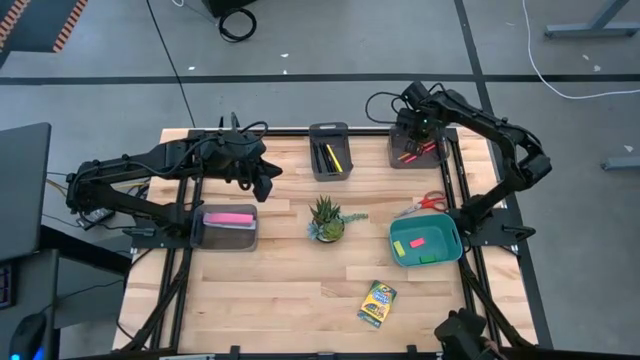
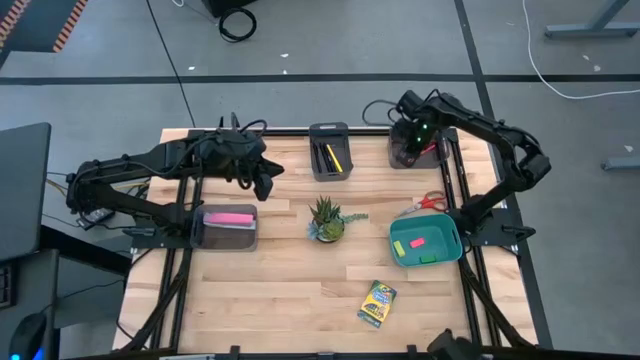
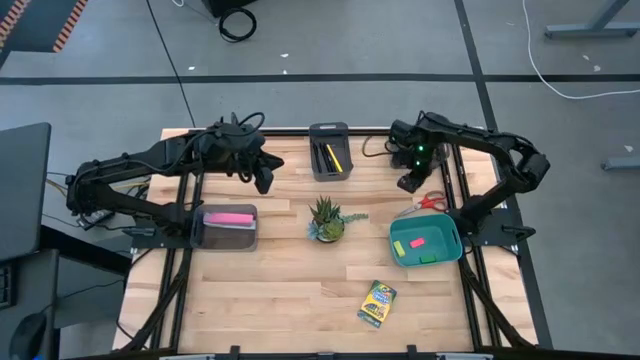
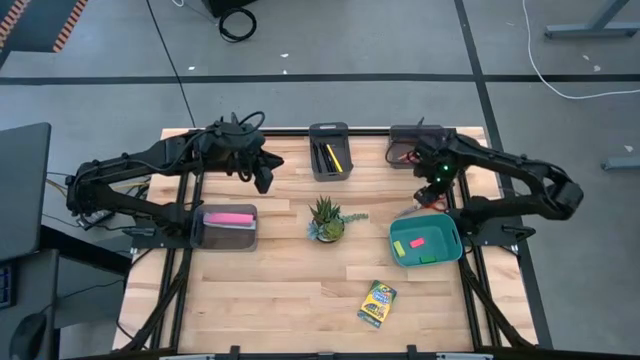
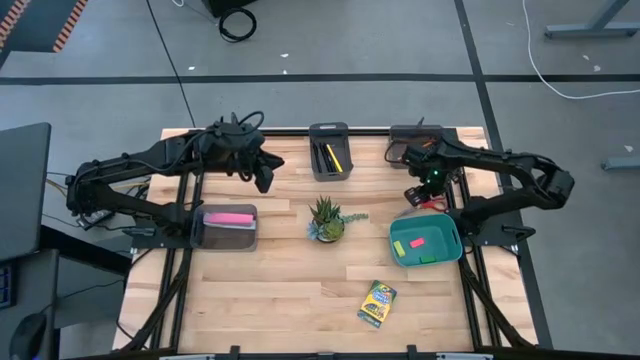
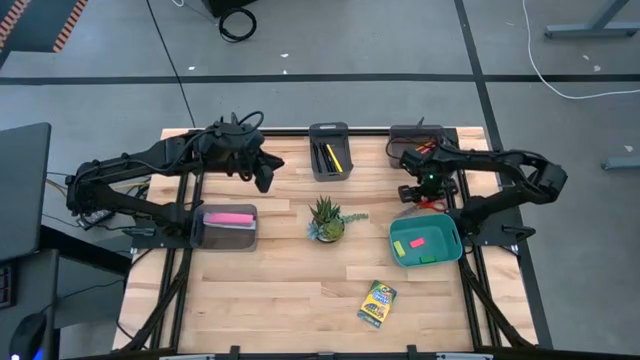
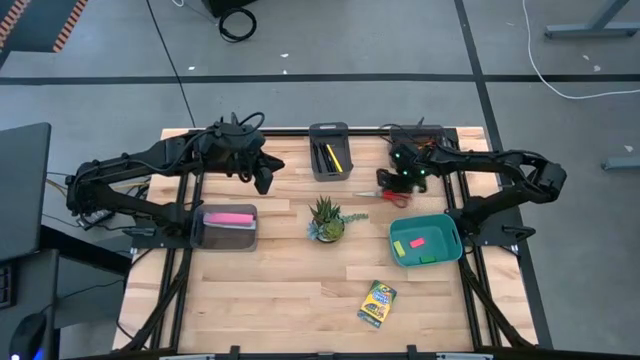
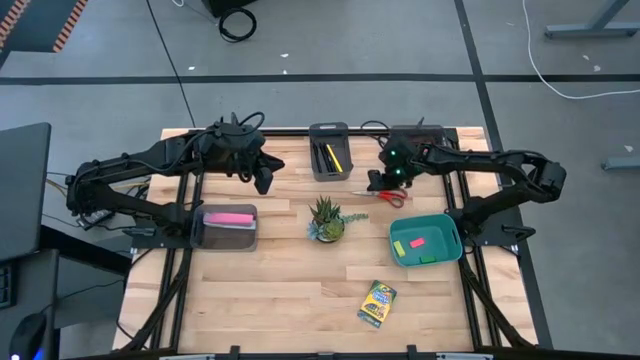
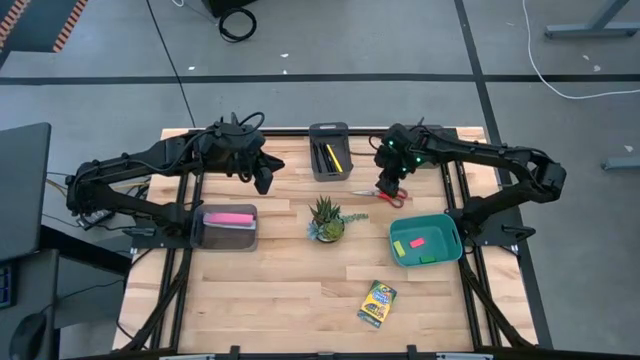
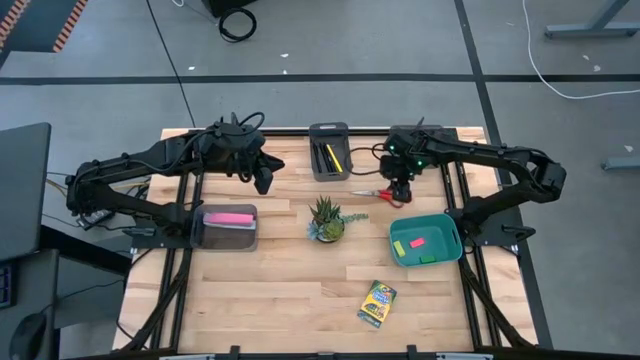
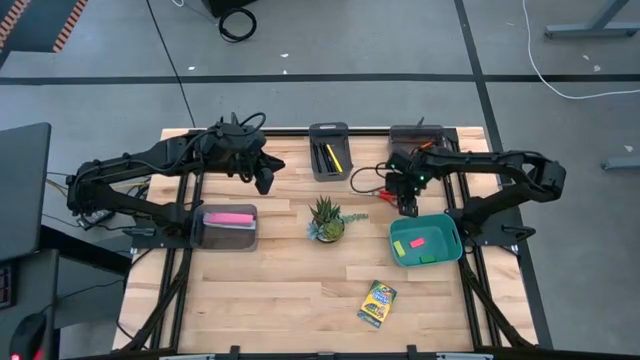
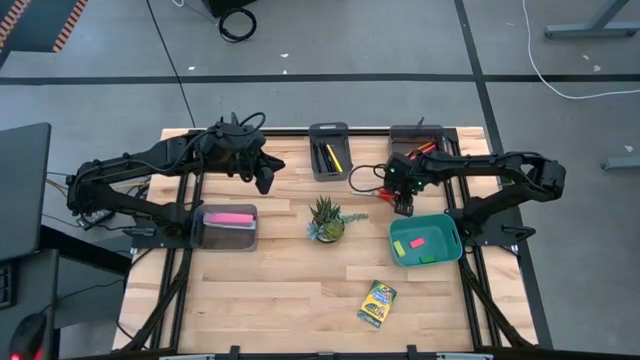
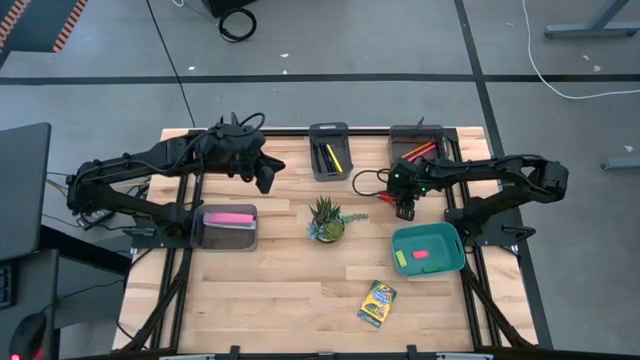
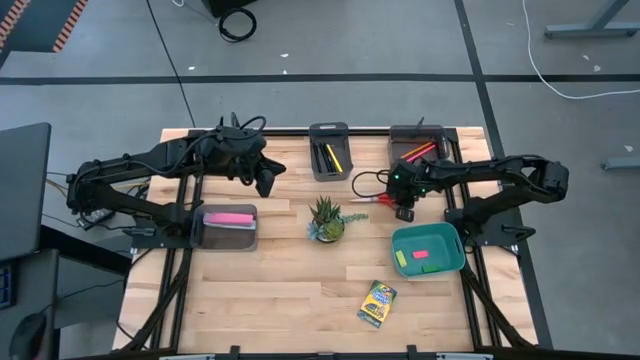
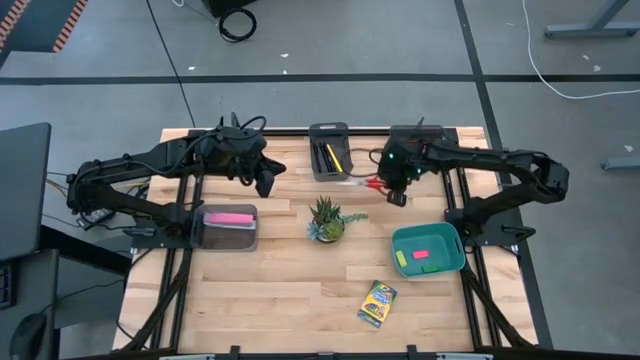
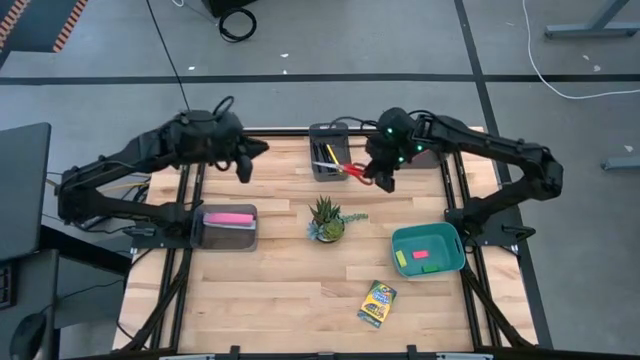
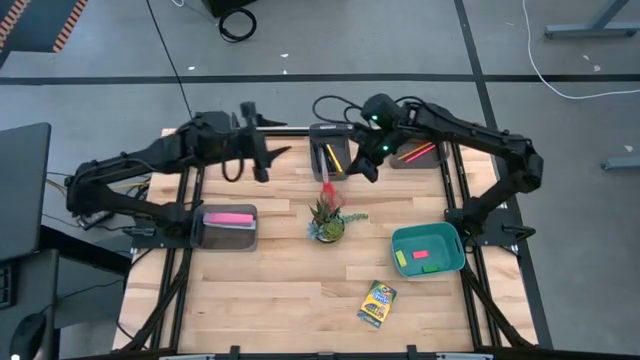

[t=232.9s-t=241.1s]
Task: Sort crayons/erasers/pens/pencils in bins
Put the red scissor into the bottom black bin

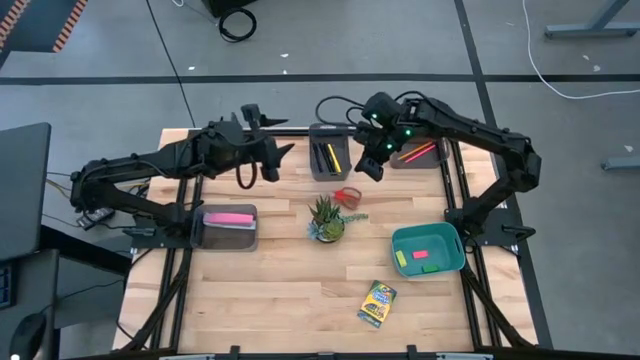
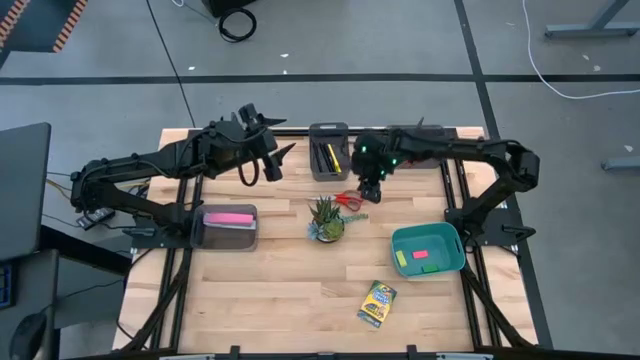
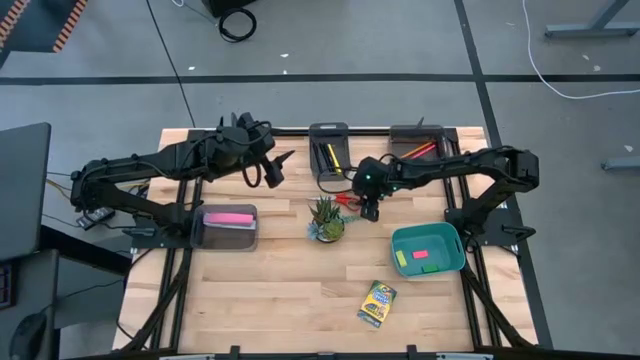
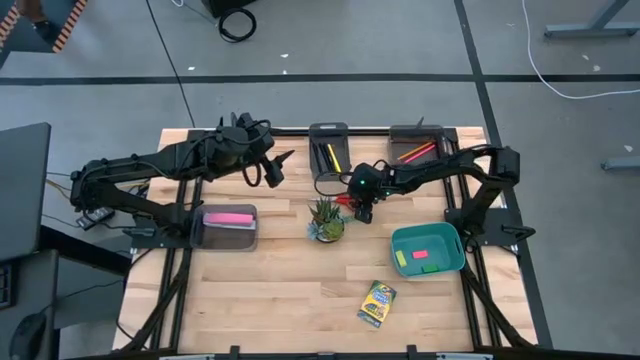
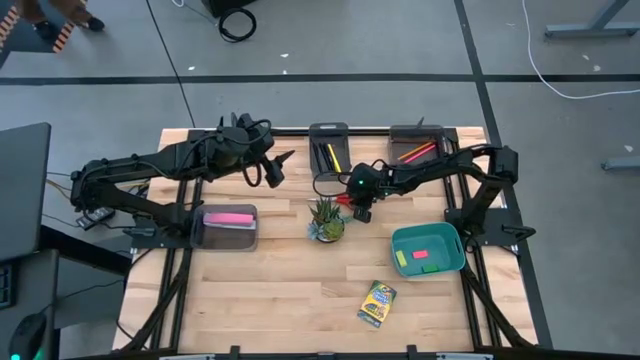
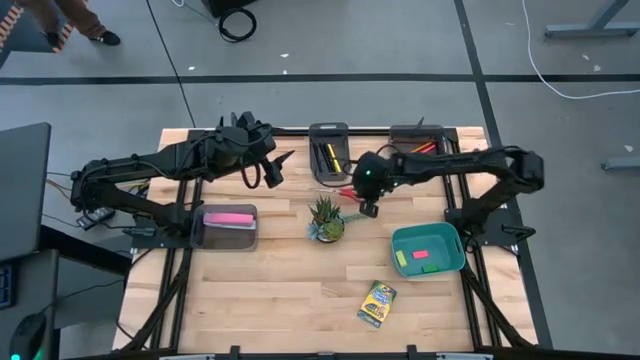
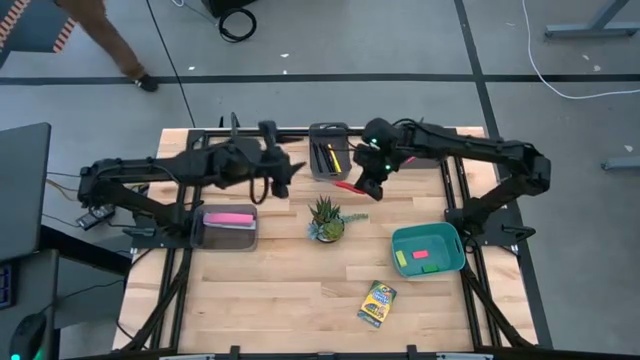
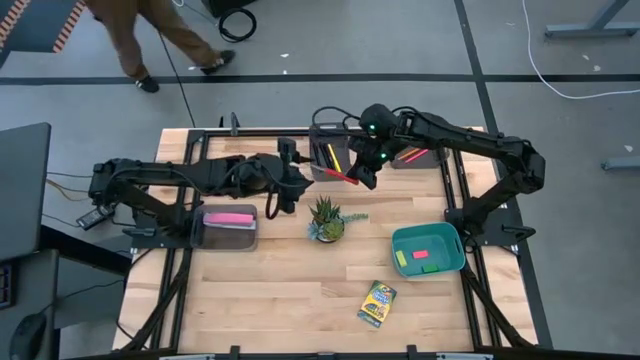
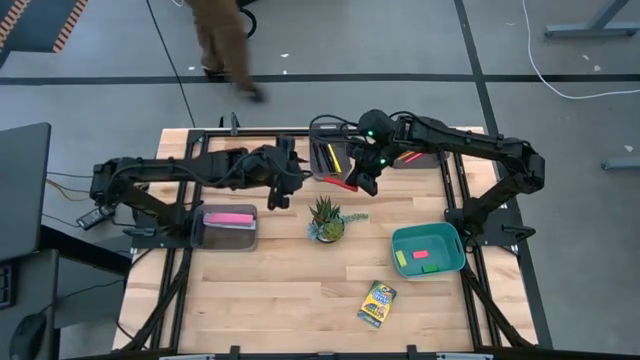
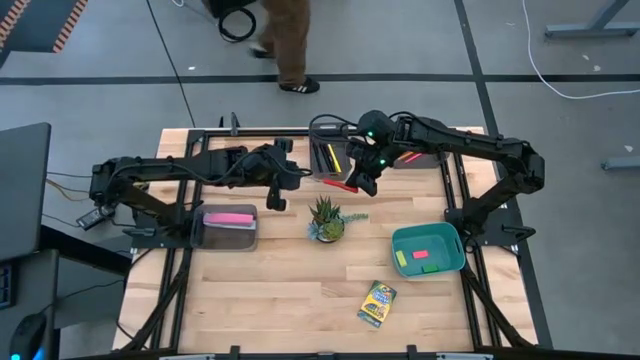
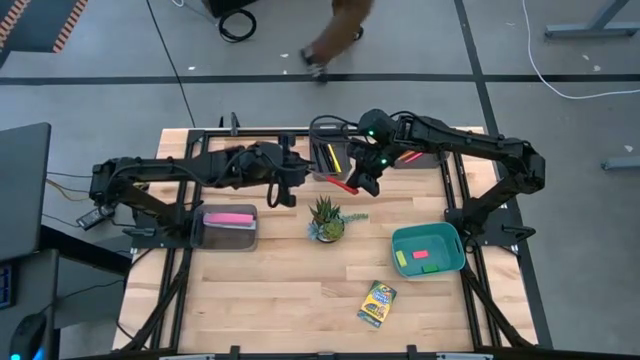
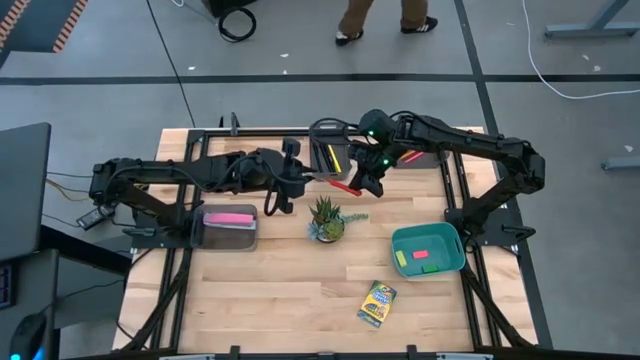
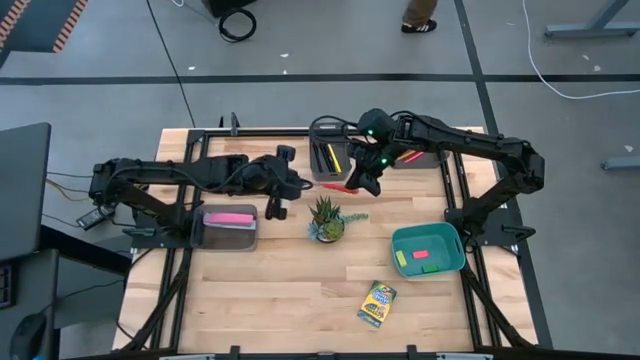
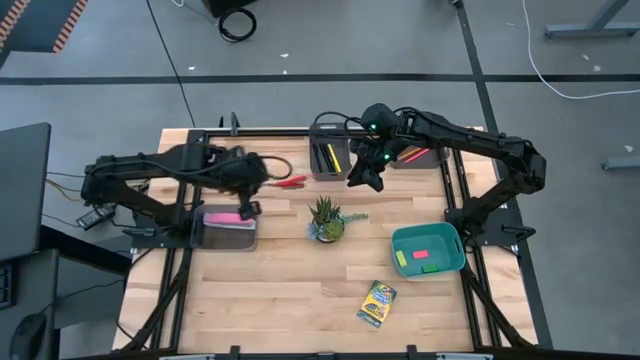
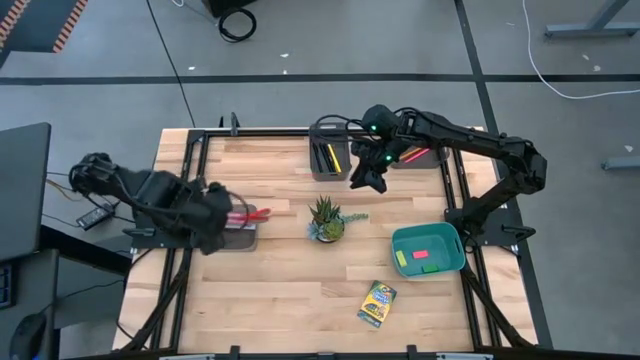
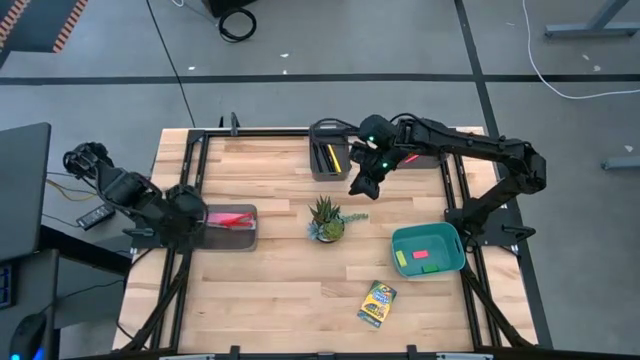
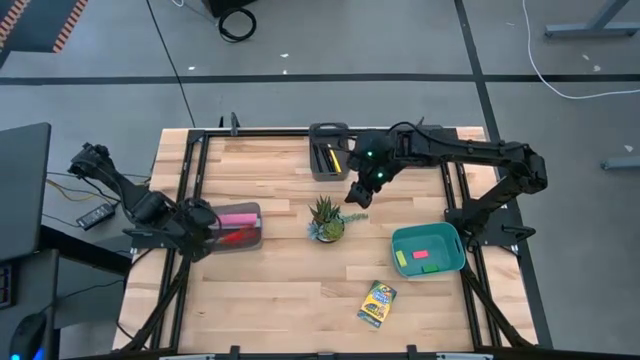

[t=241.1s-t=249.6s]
Put the orange scissor into the bottom black bin

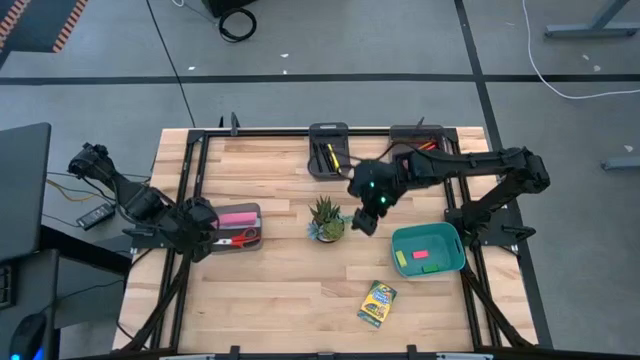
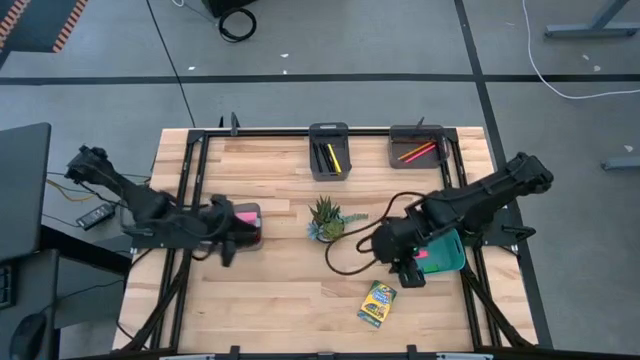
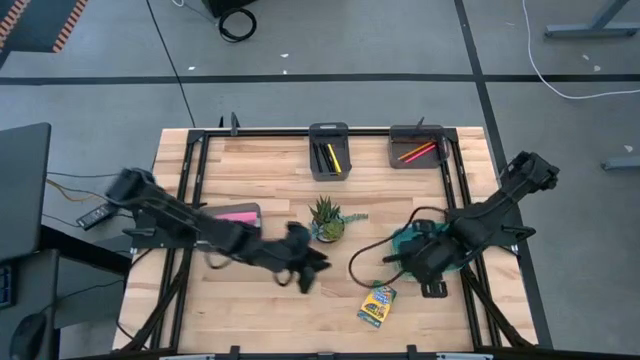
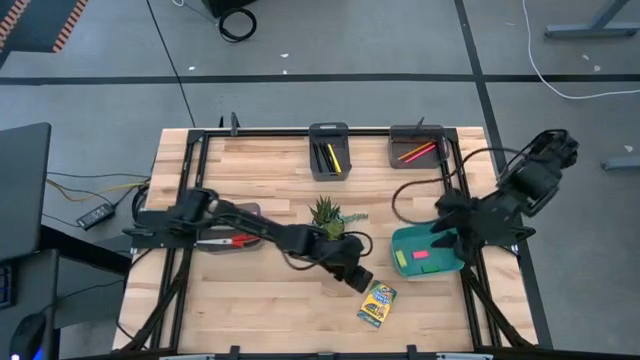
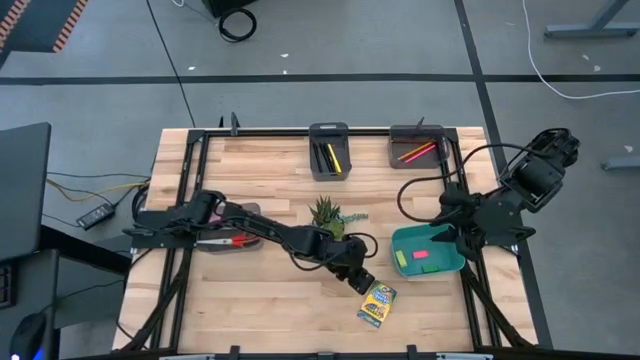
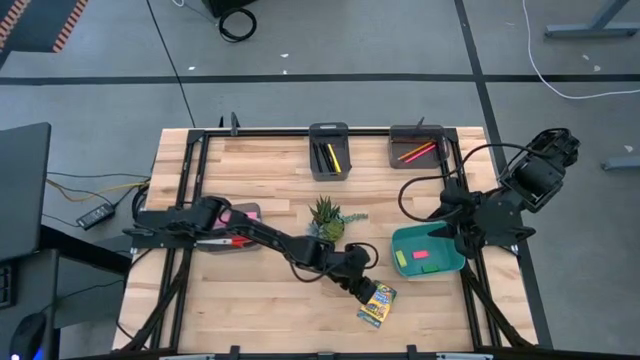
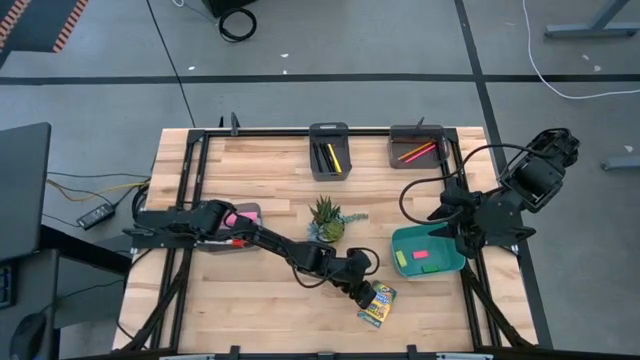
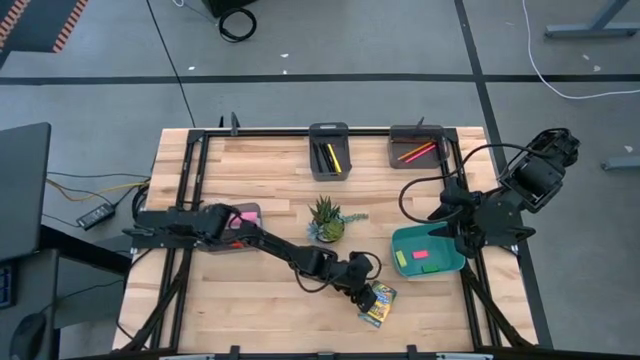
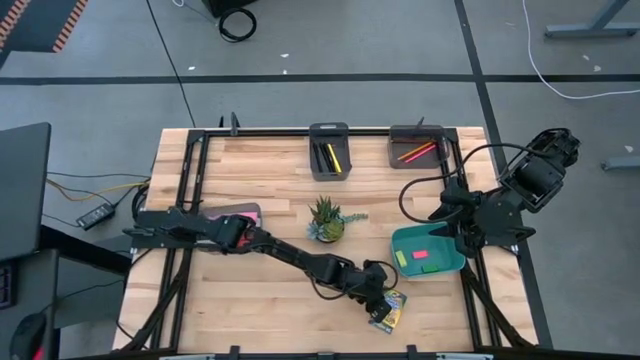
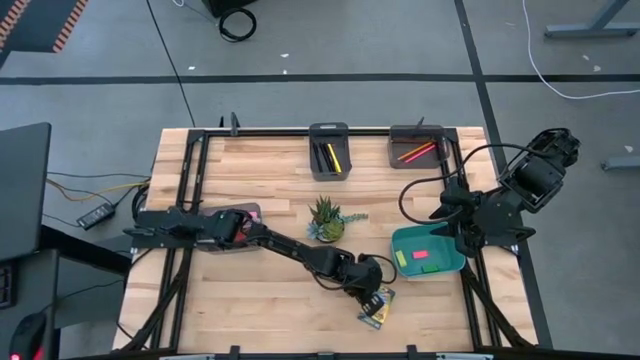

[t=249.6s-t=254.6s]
Put the yellow crayon box into the middle left black bin
